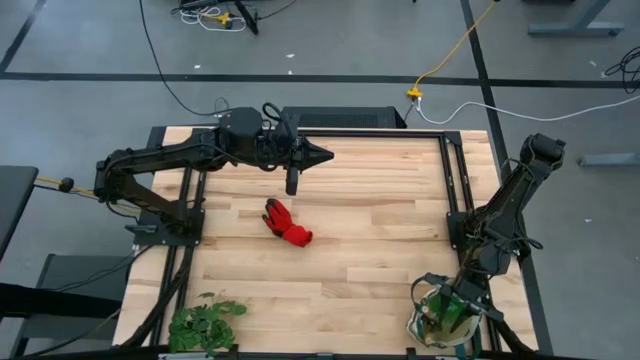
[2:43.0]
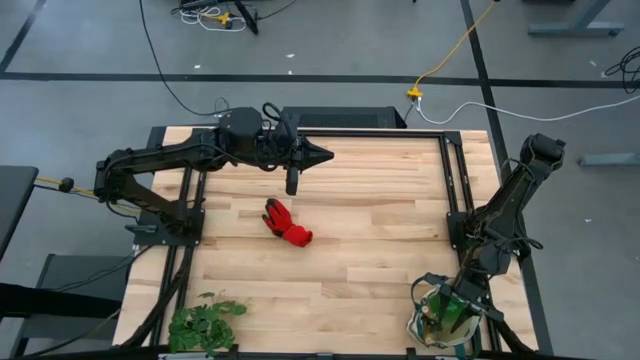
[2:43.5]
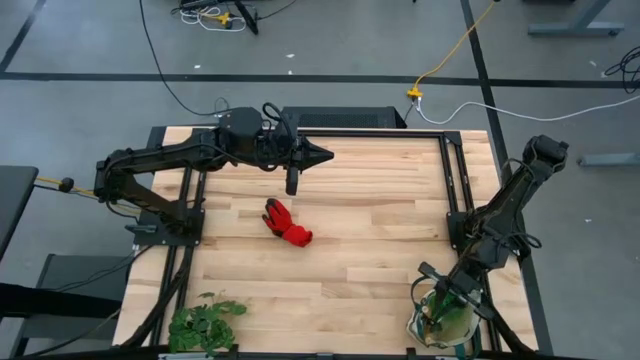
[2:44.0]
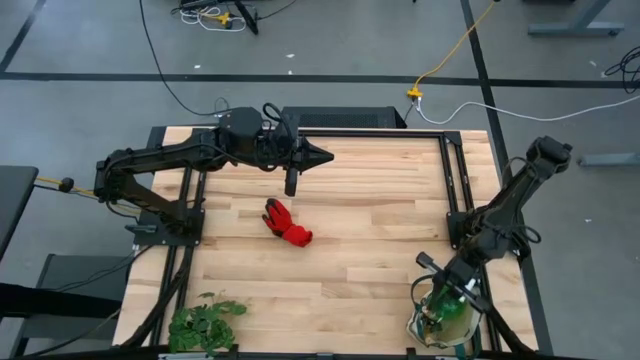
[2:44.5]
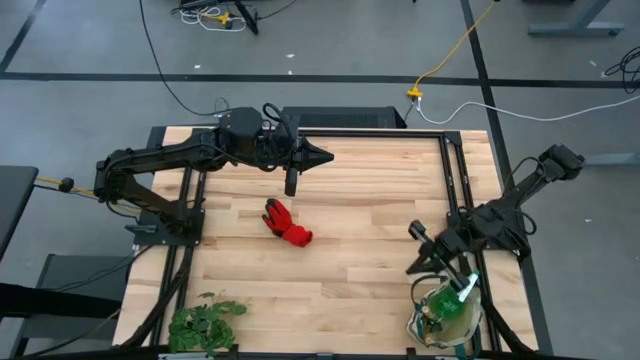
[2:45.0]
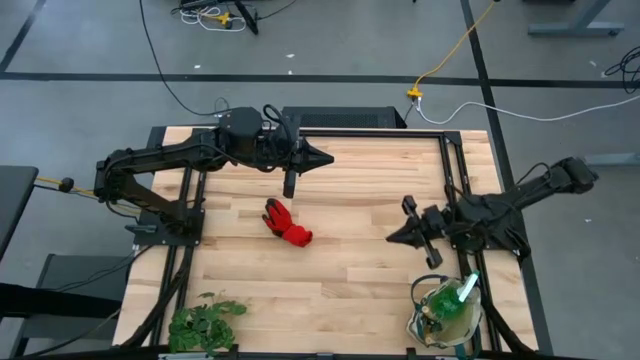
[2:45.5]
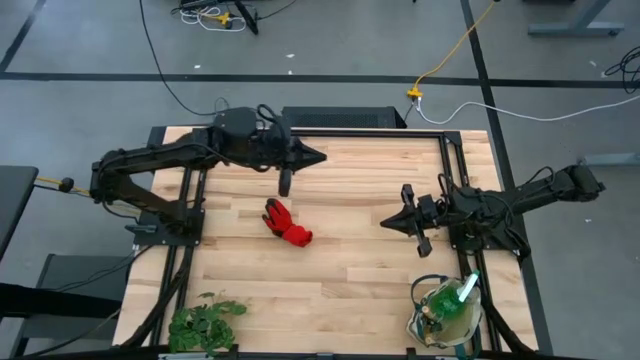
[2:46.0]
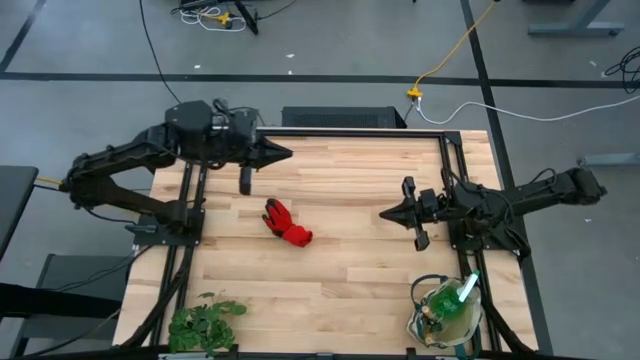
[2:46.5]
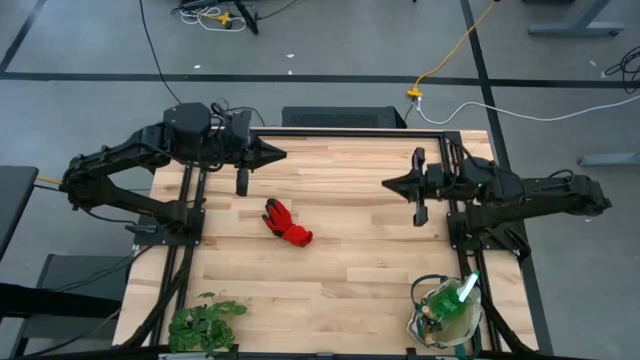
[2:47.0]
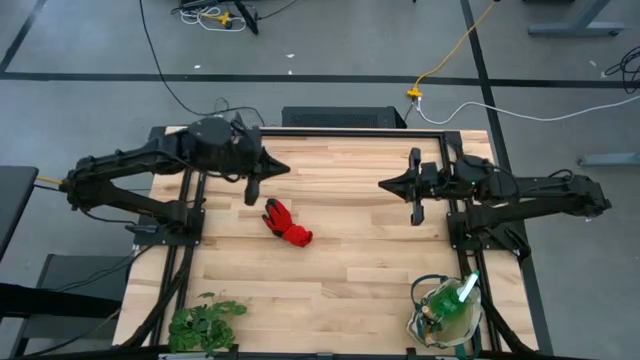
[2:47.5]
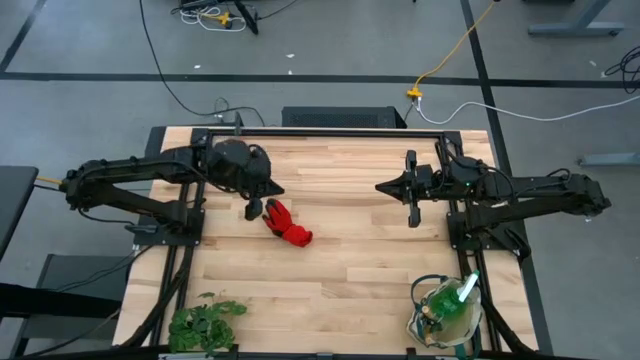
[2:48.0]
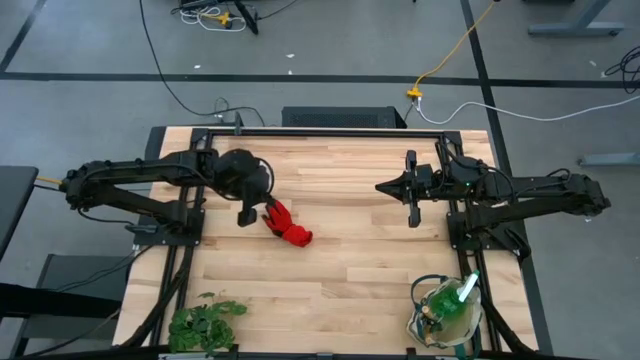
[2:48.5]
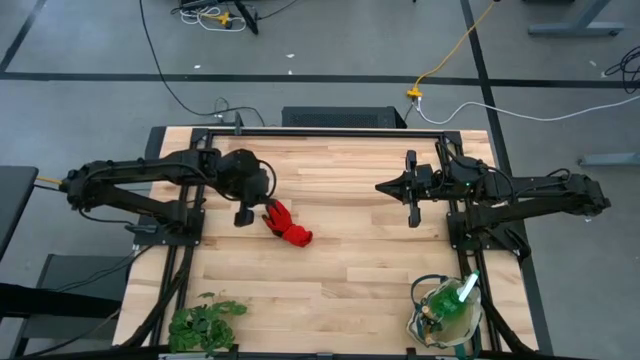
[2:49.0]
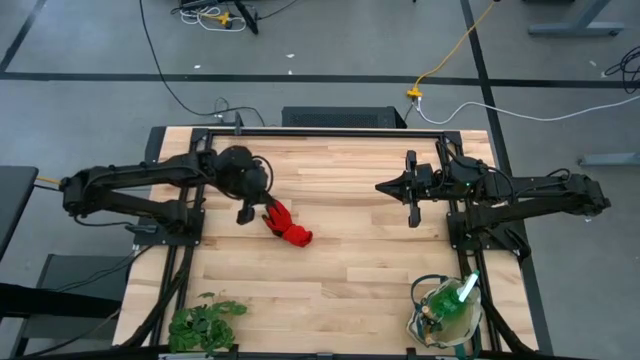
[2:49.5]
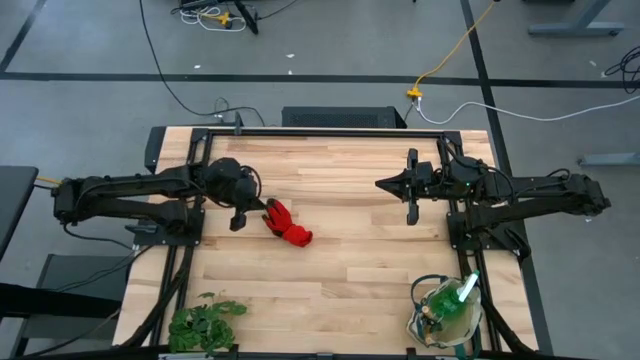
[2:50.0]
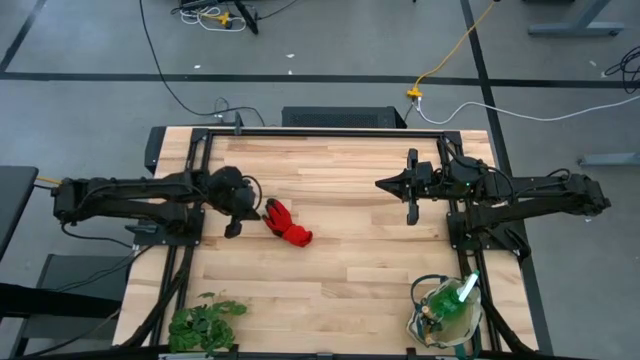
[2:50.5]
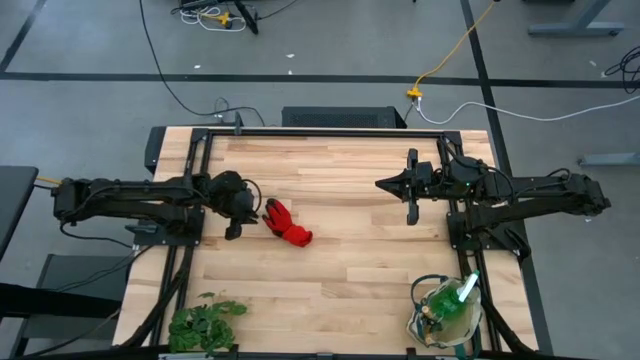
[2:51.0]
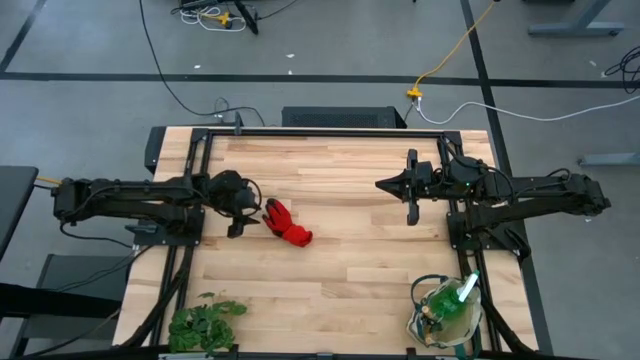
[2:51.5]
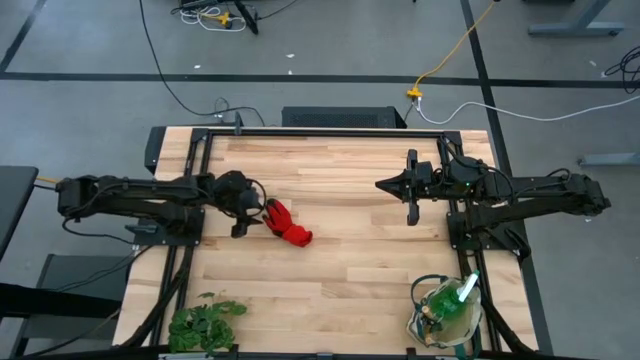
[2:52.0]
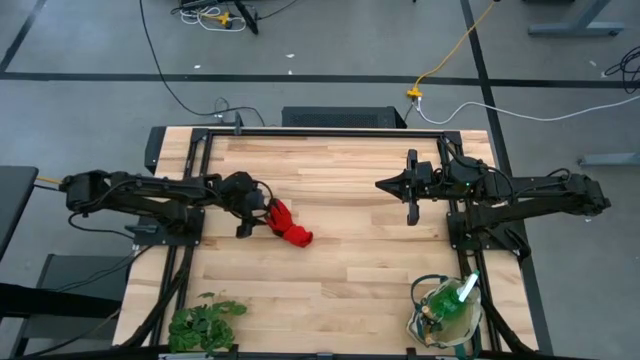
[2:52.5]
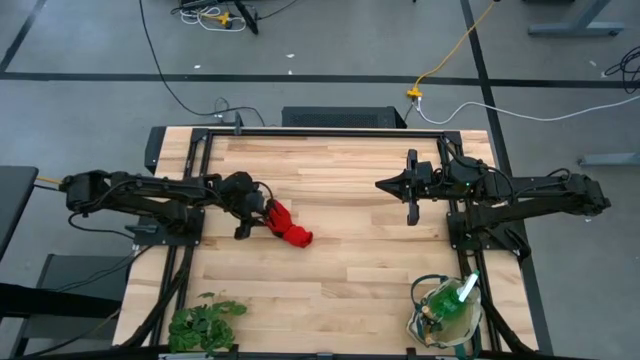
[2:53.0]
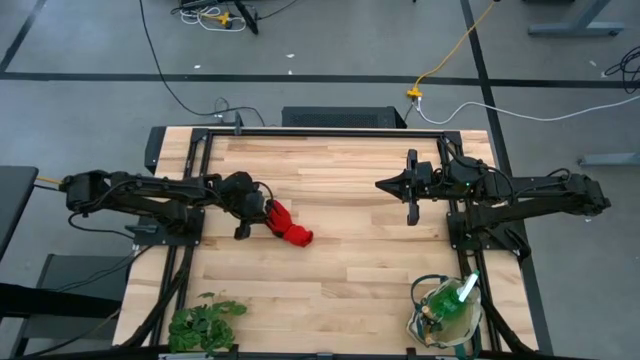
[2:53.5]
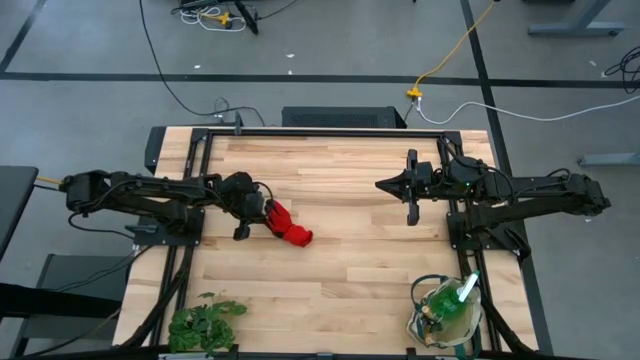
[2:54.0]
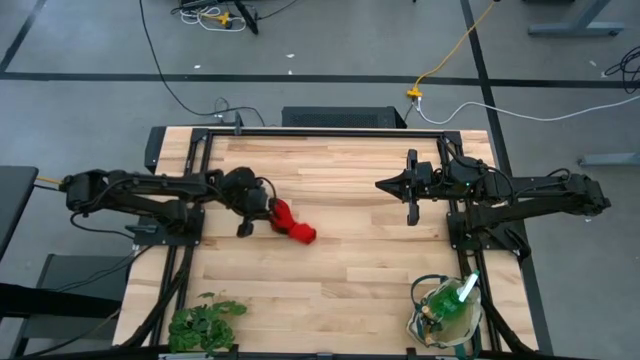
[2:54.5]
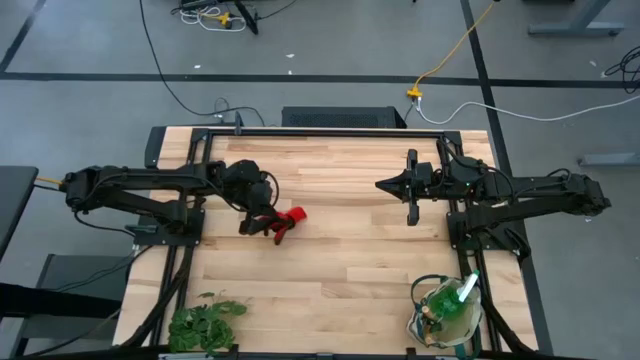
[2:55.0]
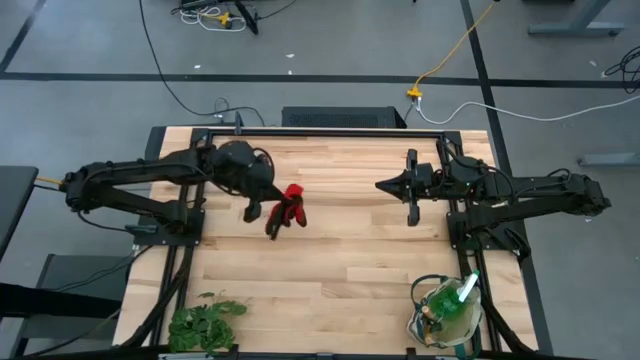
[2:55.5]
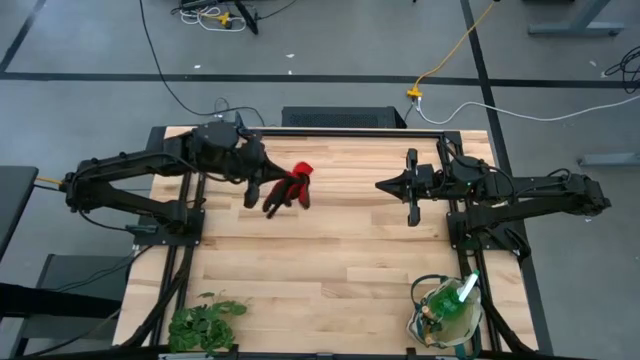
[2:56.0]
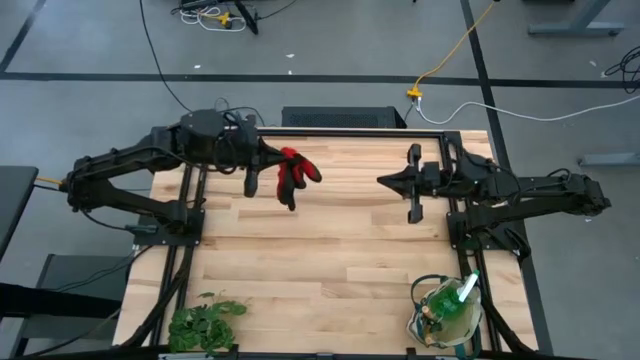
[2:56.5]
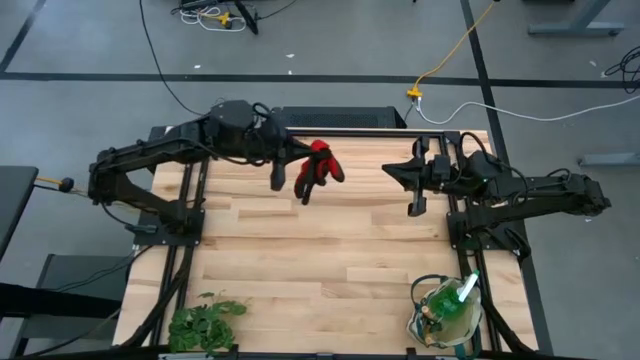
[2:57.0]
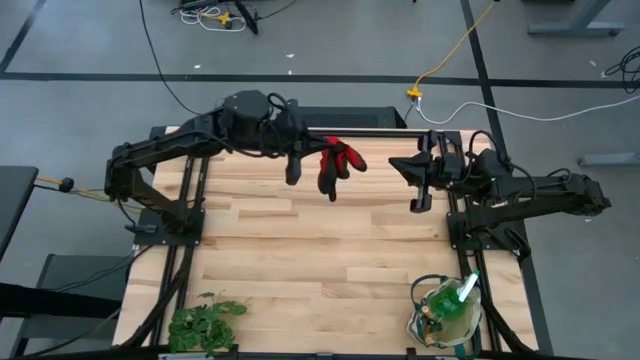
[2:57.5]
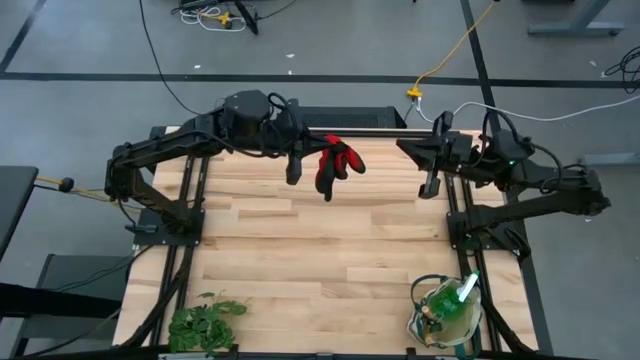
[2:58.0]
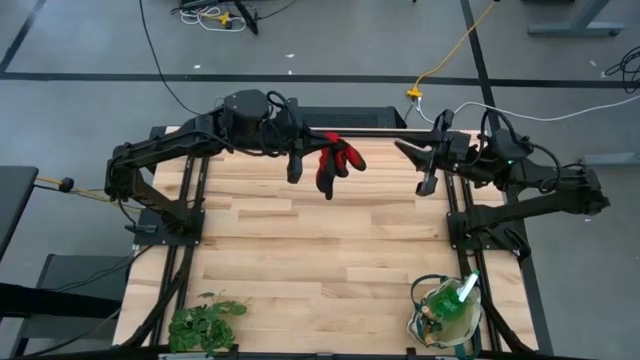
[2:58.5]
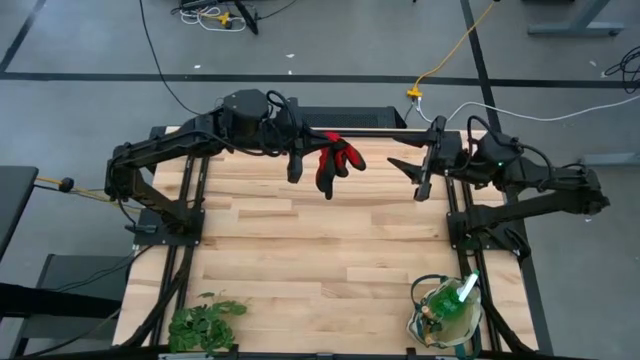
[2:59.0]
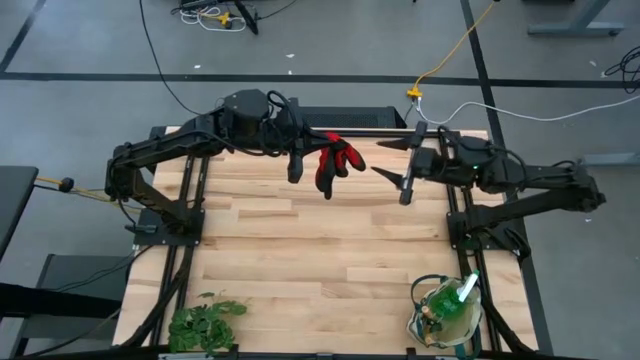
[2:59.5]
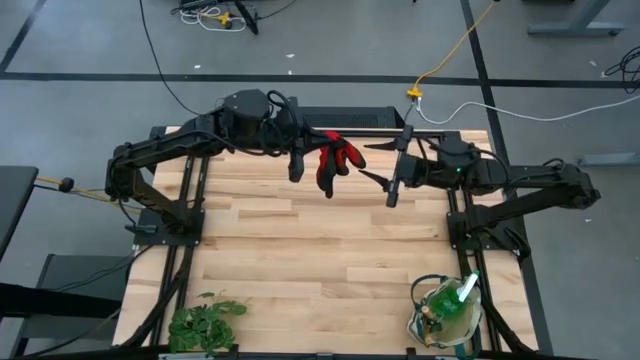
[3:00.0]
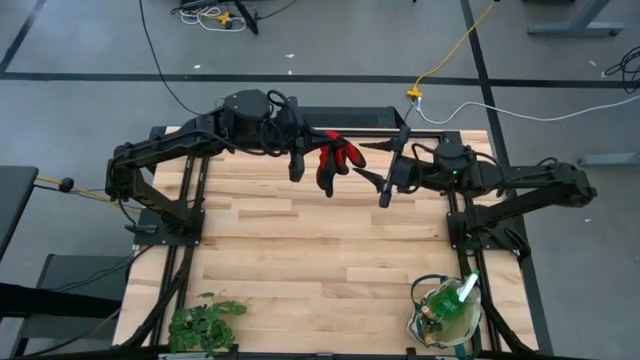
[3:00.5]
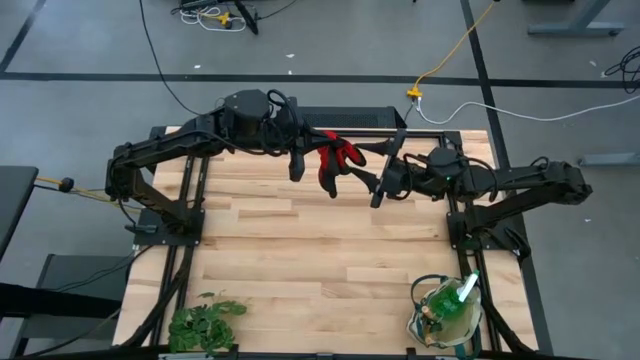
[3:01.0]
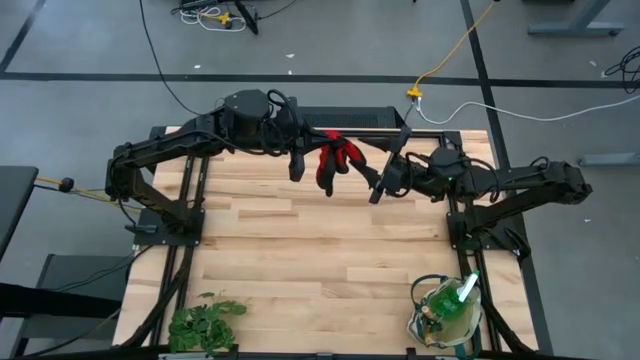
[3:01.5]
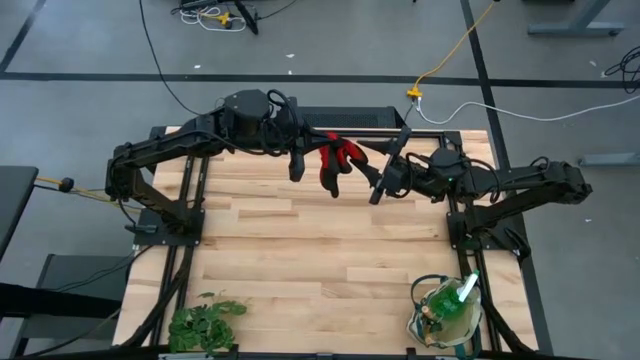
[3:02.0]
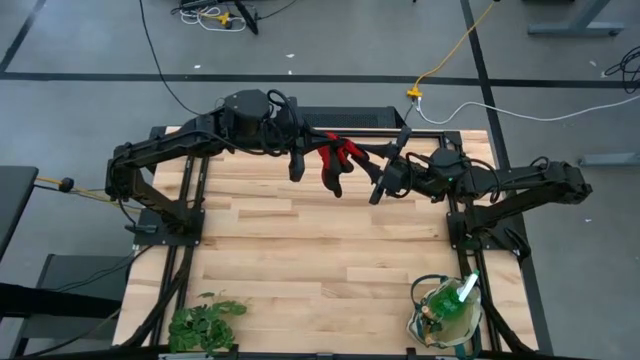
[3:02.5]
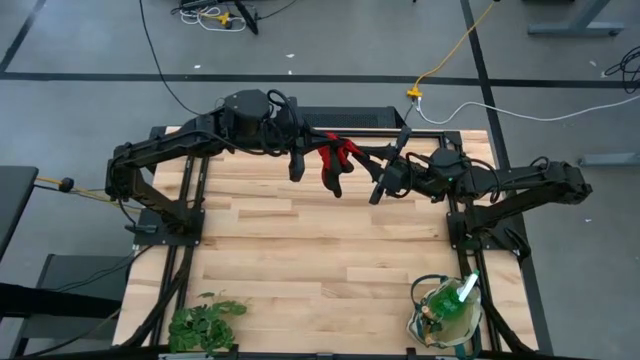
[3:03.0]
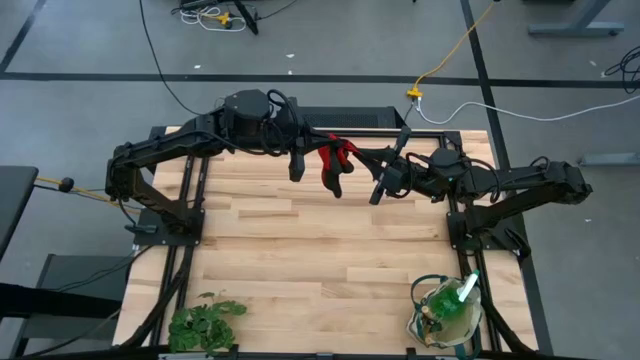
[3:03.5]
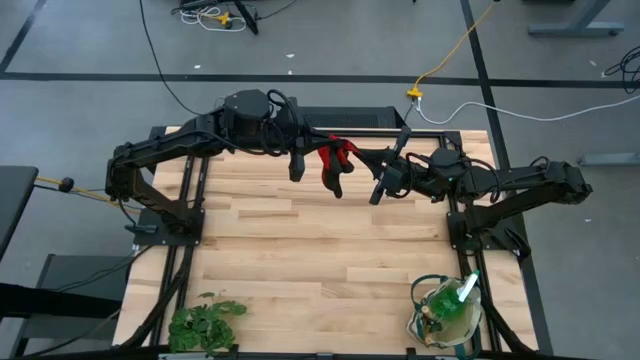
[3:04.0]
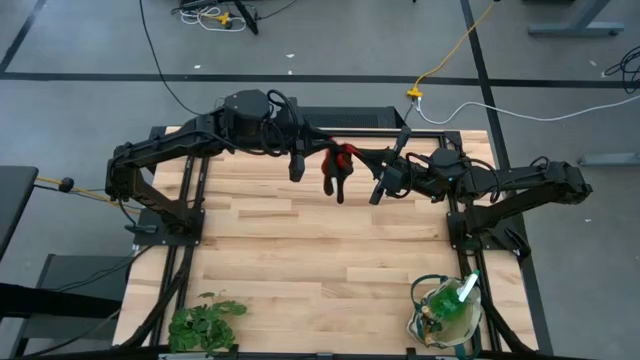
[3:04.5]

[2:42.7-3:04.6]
Task: Pick & Place Garden tools in Gardening bag
Put the red gloves into the gardening bag

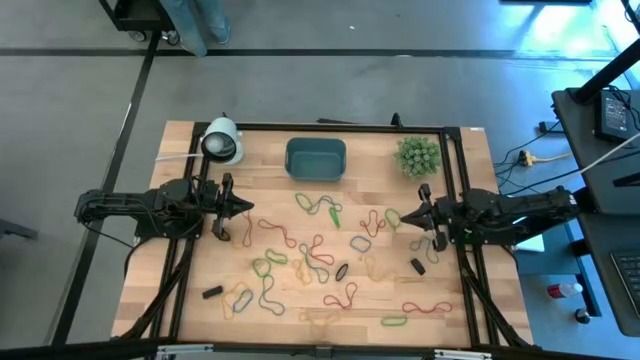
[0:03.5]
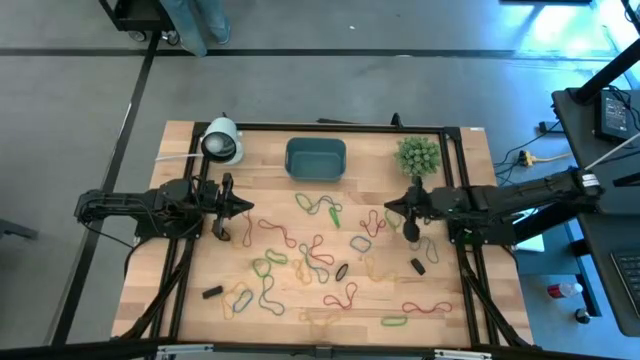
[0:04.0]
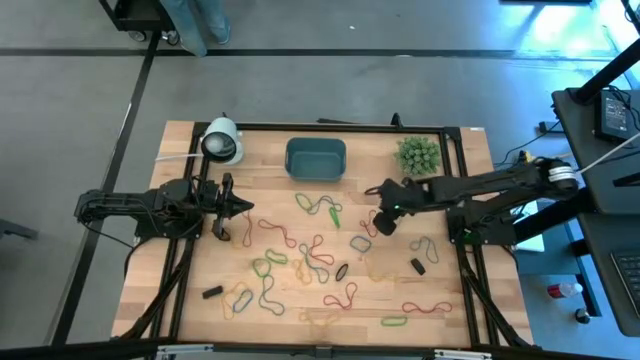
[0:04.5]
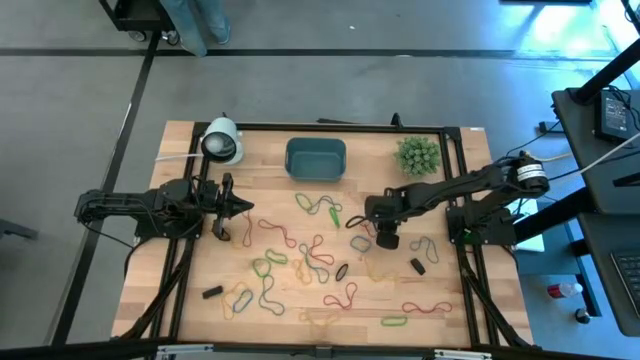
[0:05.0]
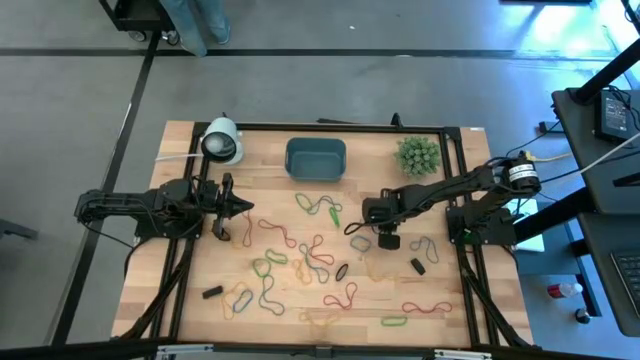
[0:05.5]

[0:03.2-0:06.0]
Task: Pick and place rubber bands into bin
Put the red rubber band into the blue bin
